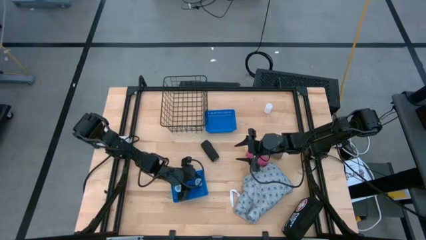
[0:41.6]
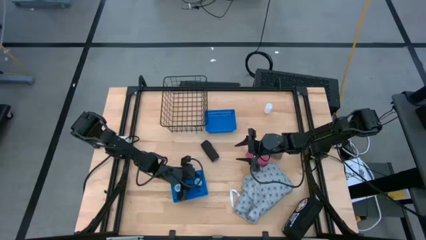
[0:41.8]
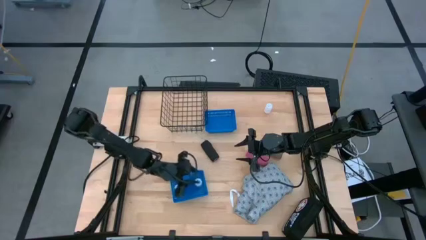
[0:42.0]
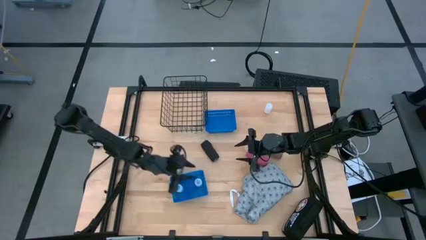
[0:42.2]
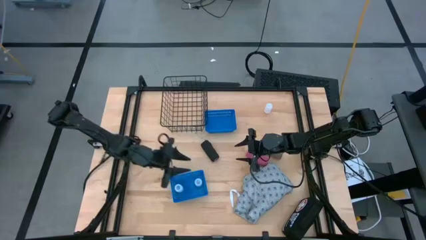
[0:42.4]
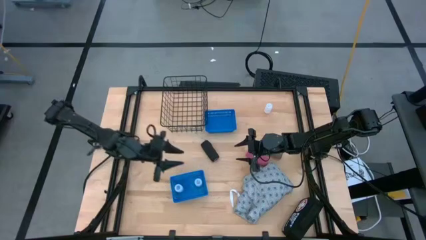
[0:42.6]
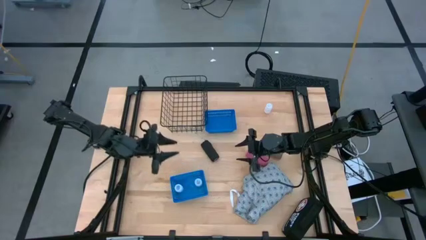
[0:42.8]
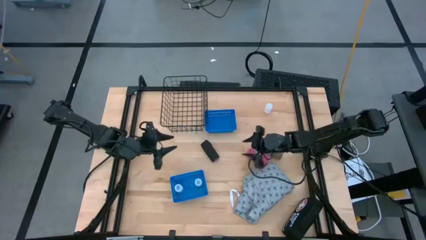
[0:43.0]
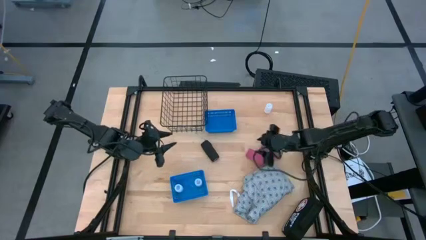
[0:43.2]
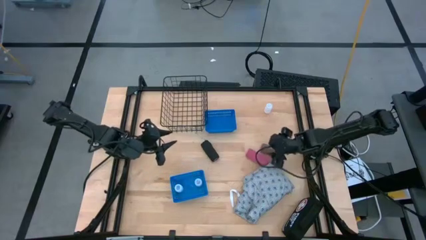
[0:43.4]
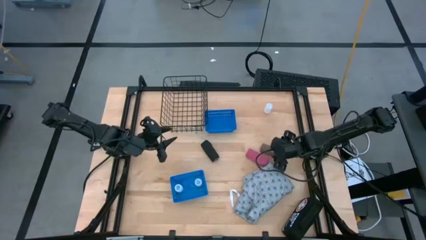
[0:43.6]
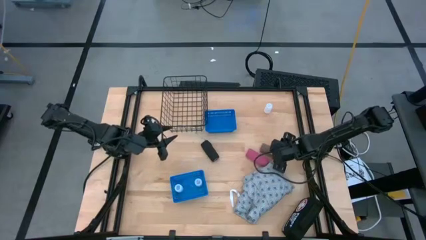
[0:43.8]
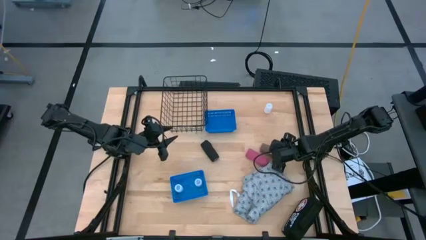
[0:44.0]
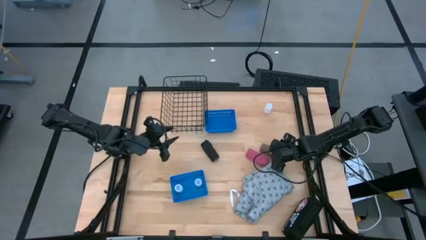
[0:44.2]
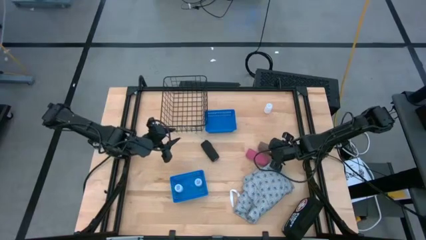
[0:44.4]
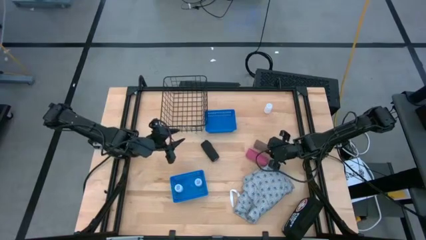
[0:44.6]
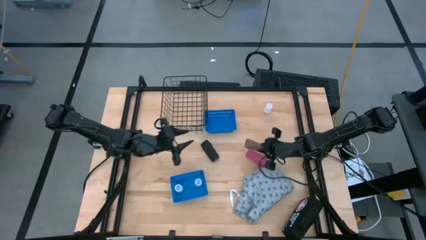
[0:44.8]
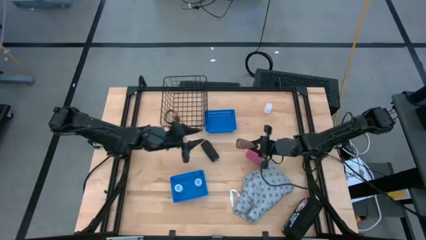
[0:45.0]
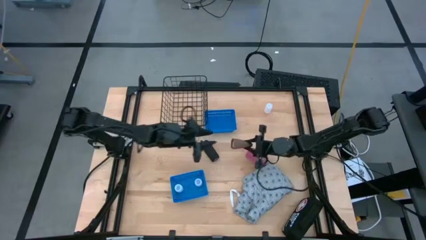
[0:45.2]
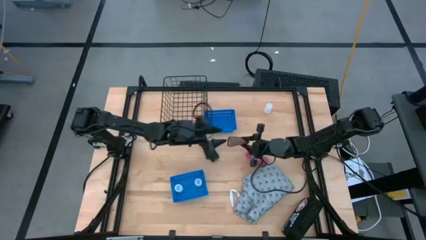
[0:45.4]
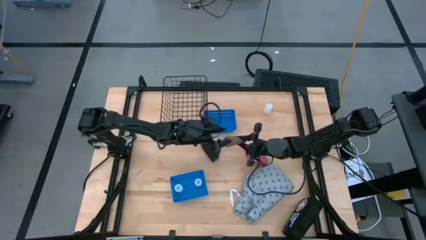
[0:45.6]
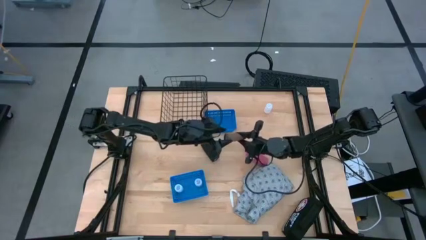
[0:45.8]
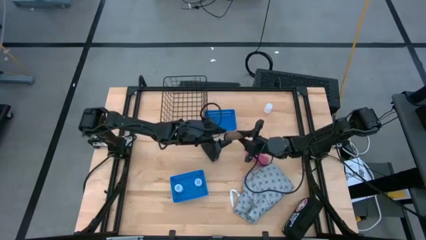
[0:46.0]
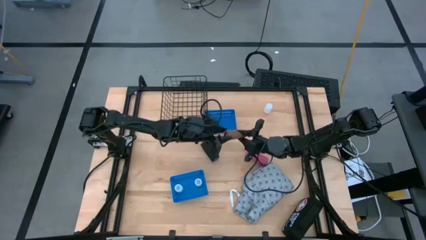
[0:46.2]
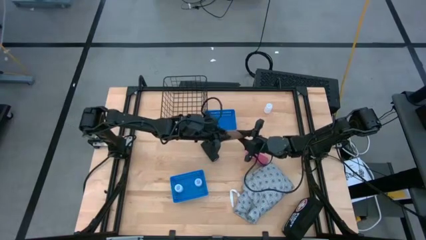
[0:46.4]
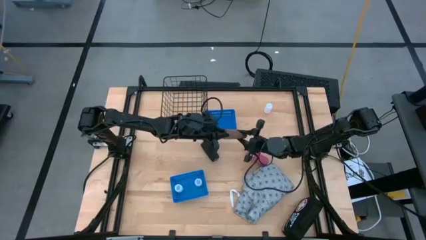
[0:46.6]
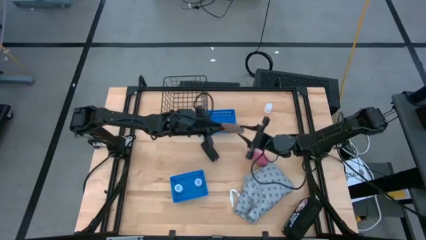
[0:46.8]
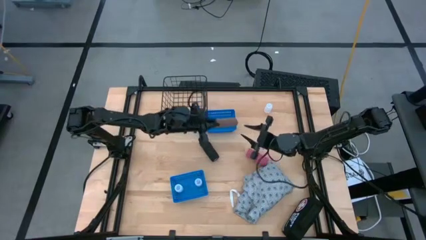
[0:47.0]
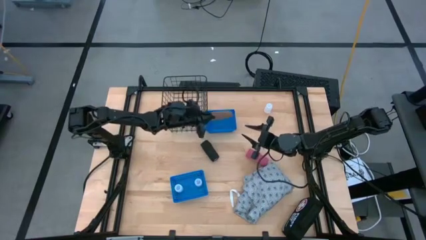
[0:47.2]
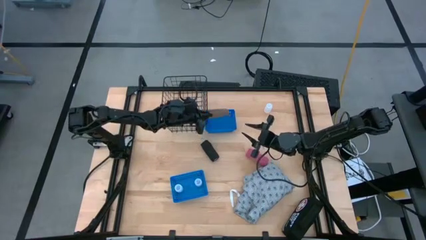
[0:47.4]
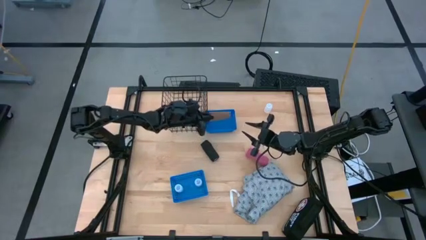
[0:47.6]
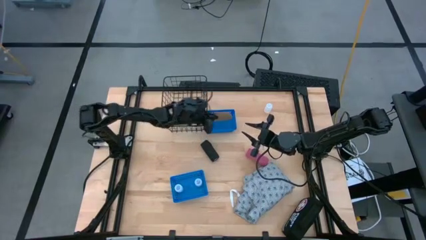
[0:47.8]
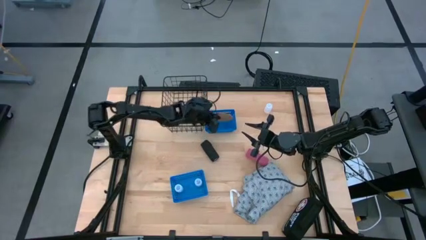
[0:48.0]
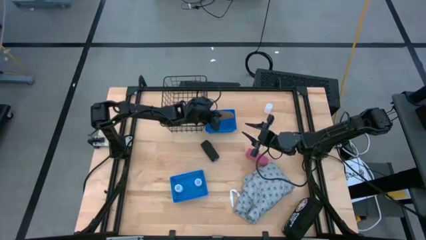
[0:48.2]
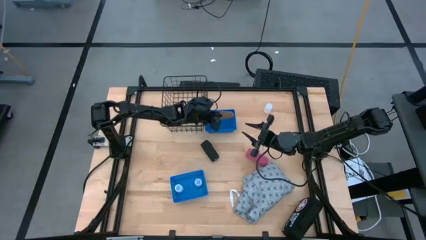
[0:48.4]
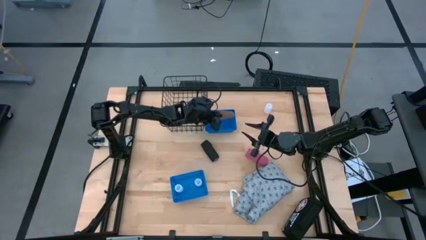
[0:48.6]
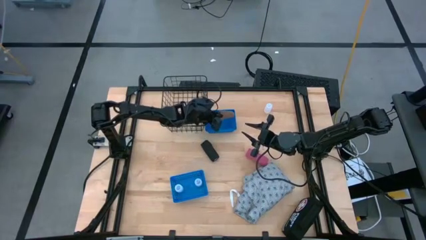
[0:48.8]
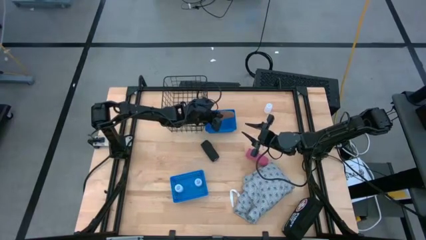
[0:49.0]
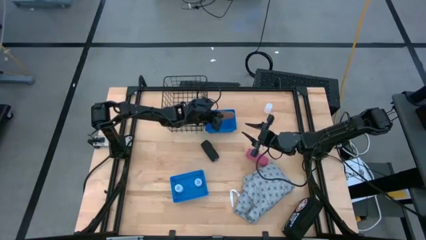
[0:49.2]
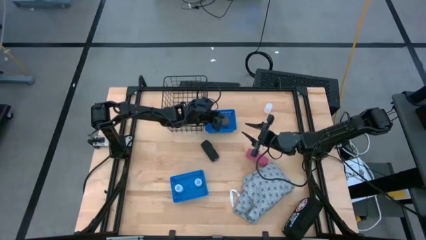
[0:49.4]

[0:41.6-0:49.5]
Task: Pick & Place Medicine items
Put the brown bandage into the top blue basket
